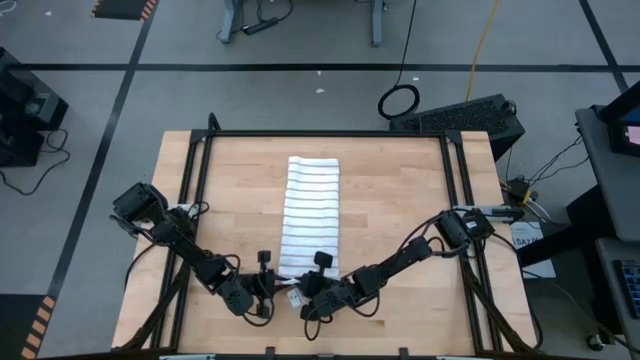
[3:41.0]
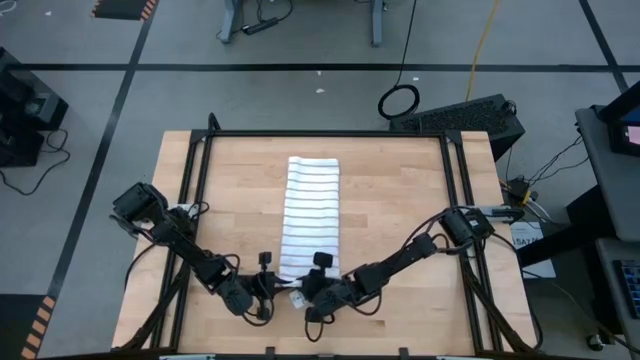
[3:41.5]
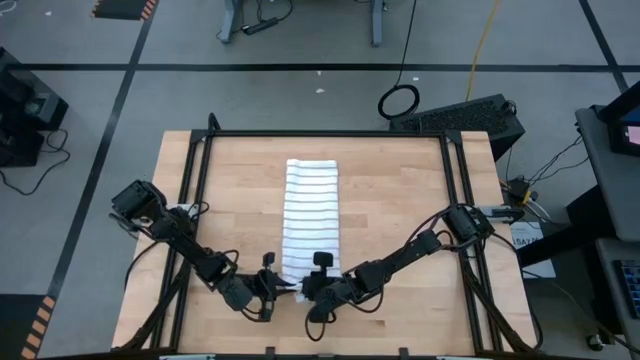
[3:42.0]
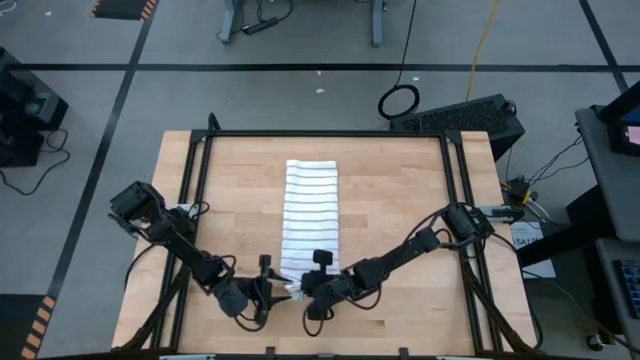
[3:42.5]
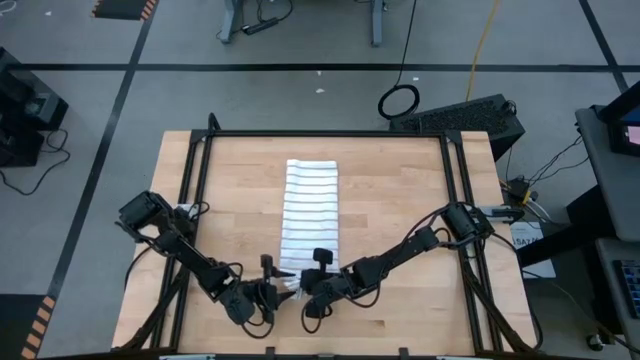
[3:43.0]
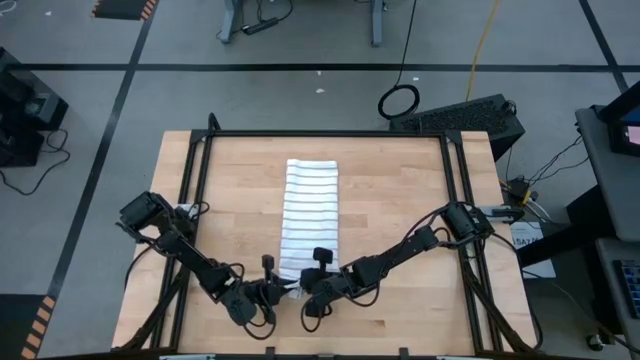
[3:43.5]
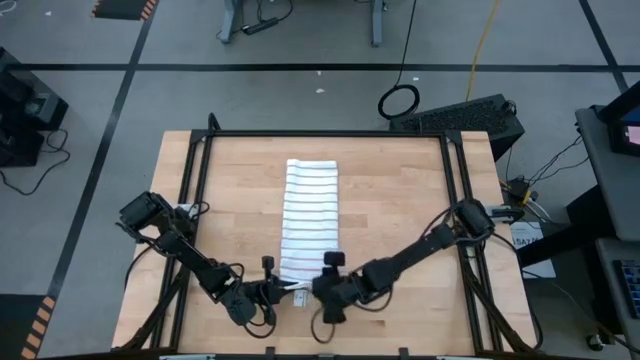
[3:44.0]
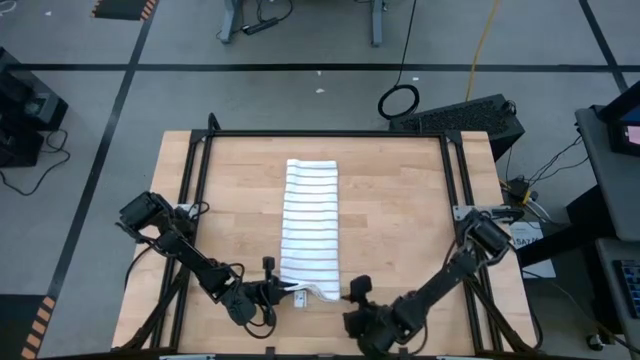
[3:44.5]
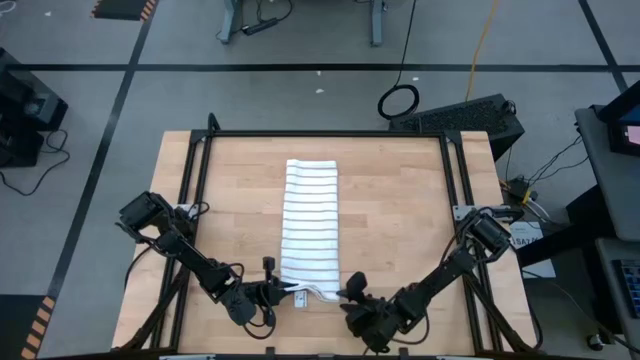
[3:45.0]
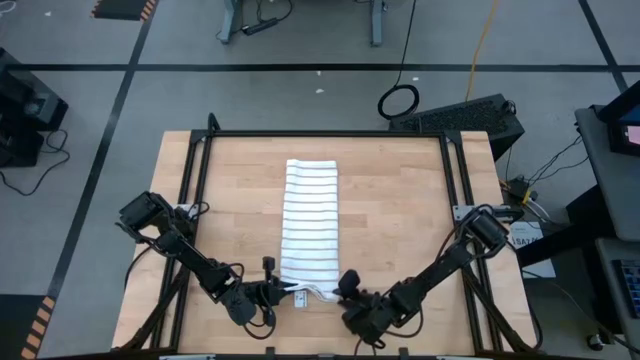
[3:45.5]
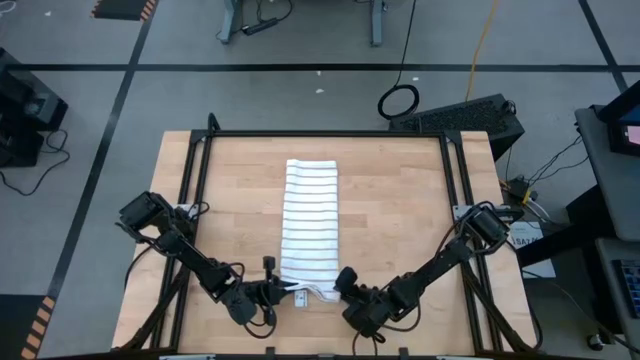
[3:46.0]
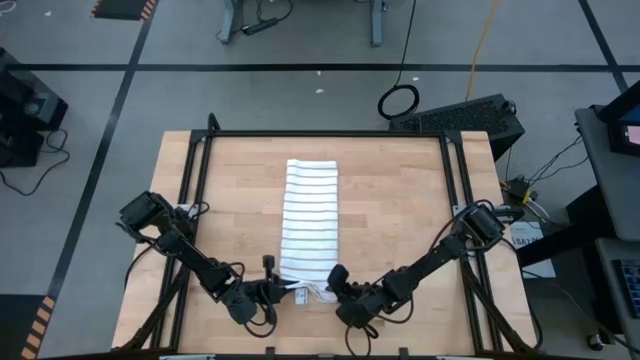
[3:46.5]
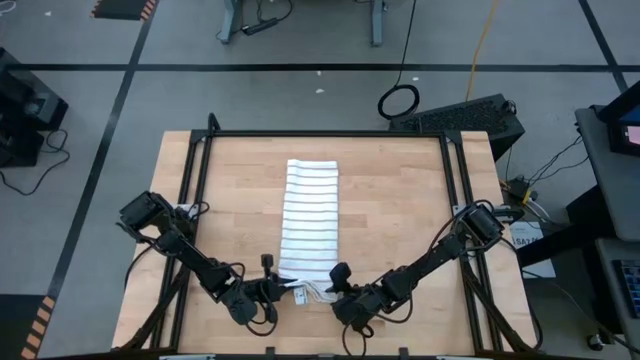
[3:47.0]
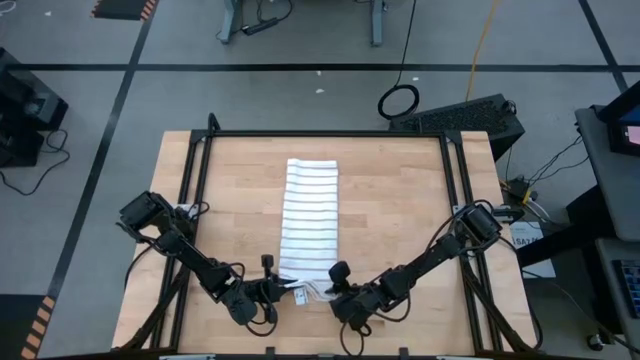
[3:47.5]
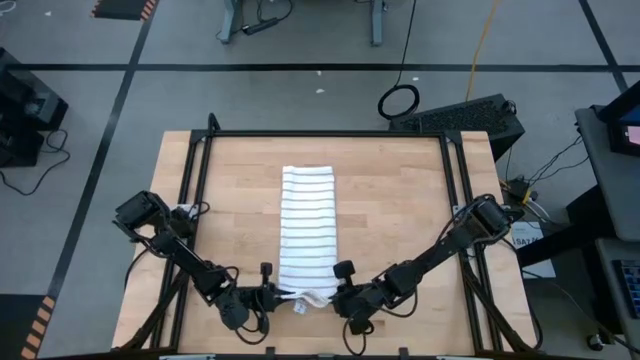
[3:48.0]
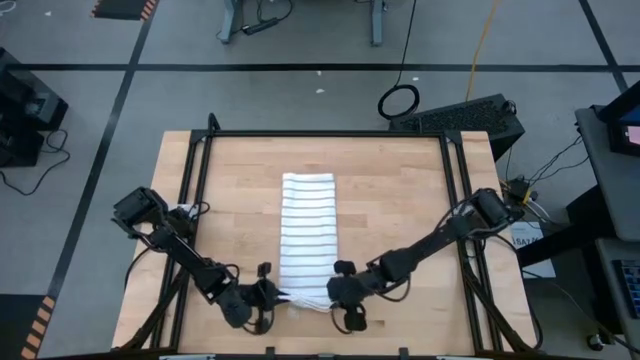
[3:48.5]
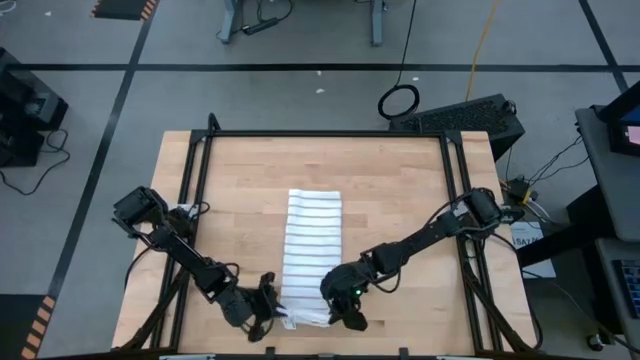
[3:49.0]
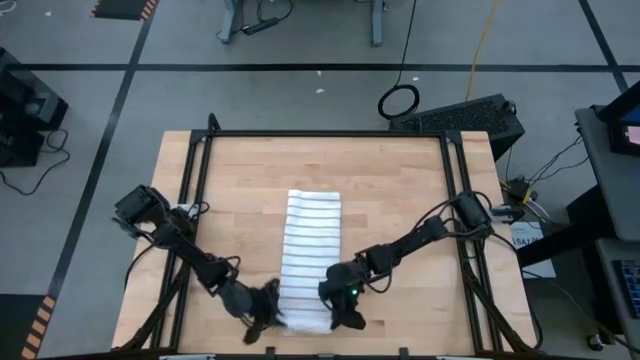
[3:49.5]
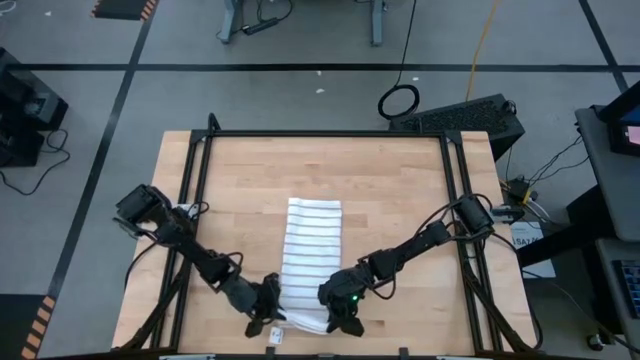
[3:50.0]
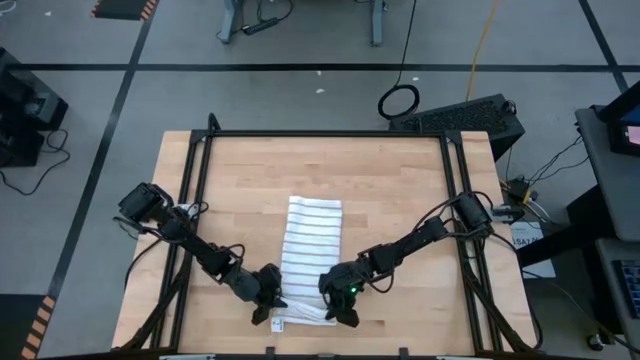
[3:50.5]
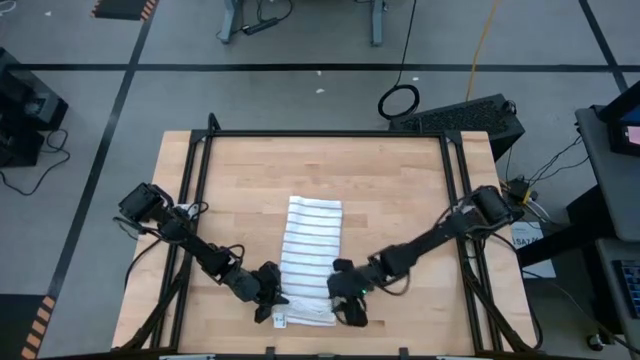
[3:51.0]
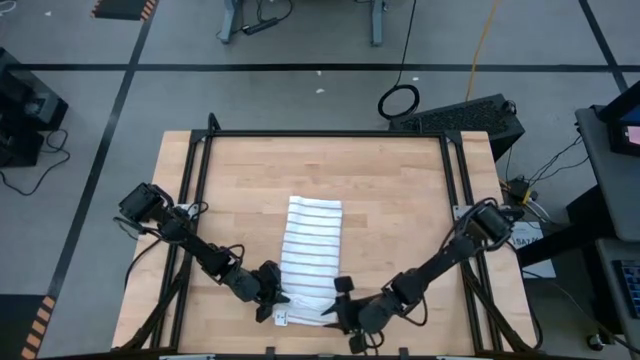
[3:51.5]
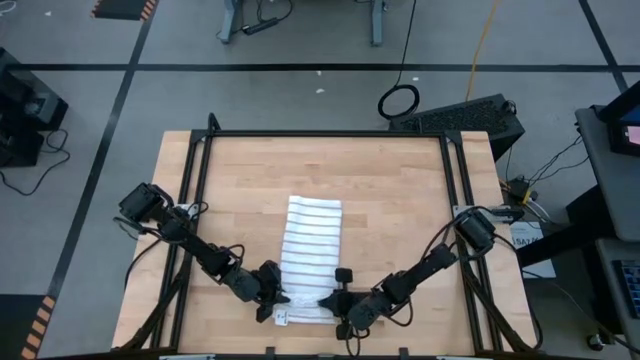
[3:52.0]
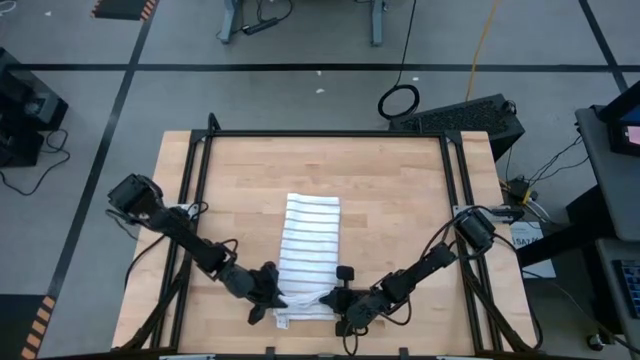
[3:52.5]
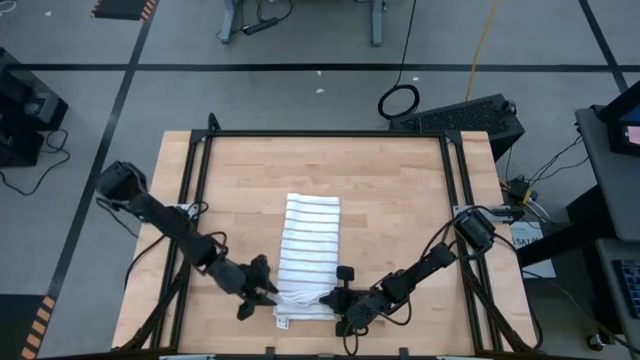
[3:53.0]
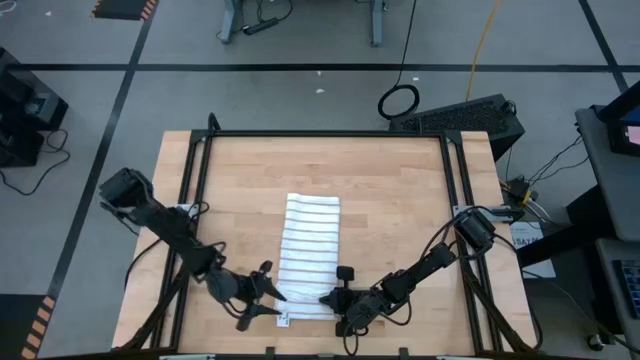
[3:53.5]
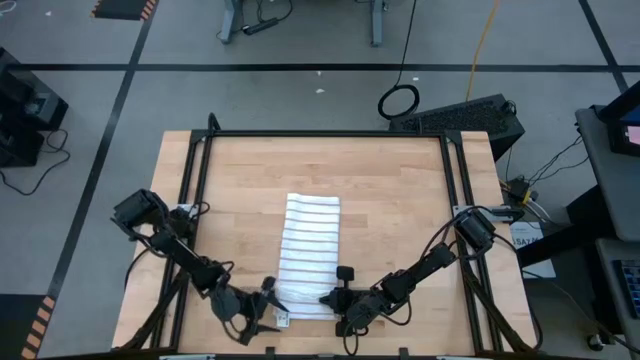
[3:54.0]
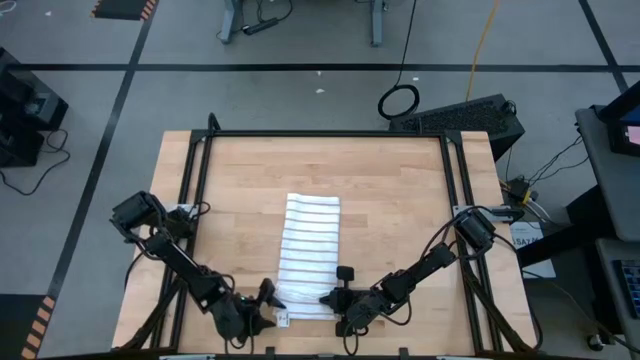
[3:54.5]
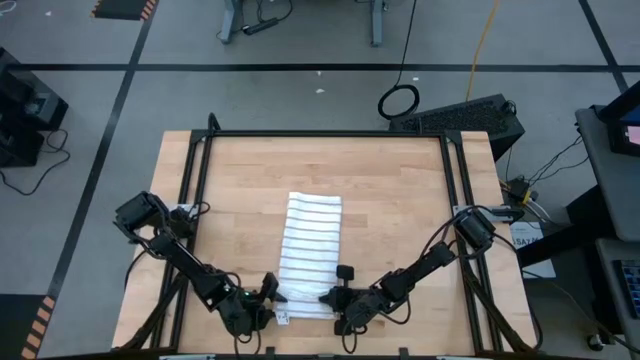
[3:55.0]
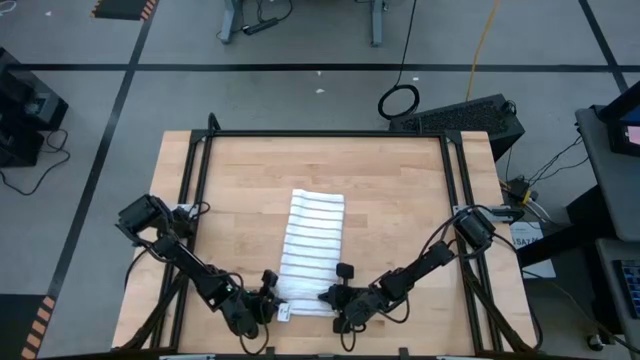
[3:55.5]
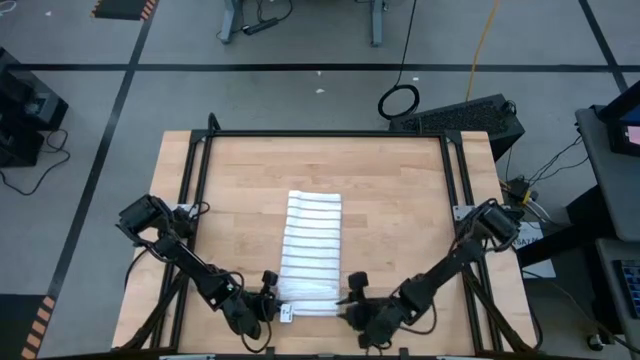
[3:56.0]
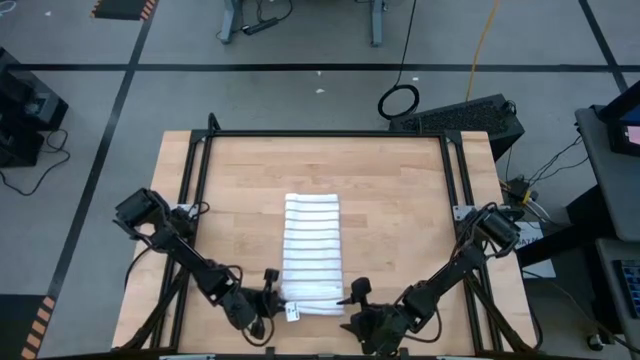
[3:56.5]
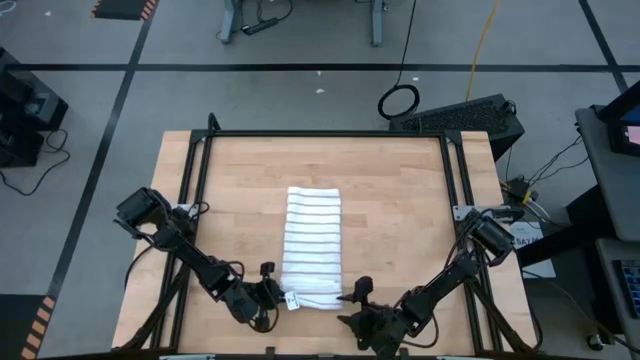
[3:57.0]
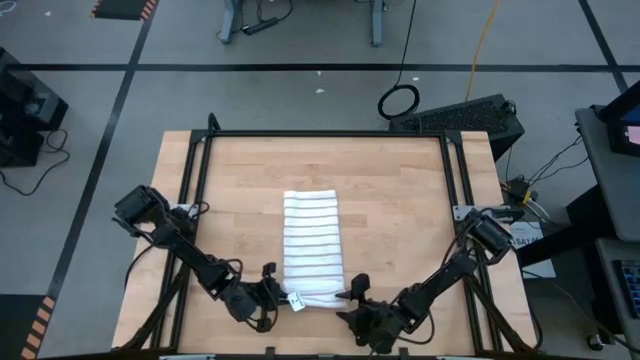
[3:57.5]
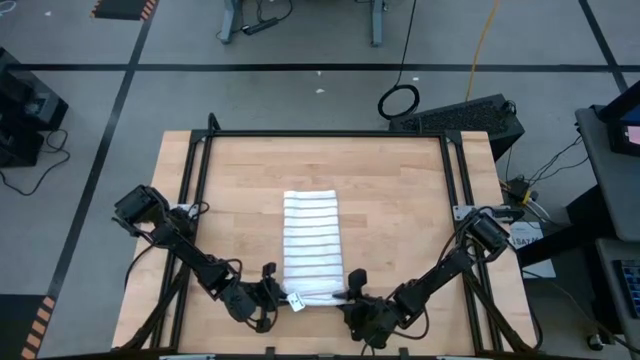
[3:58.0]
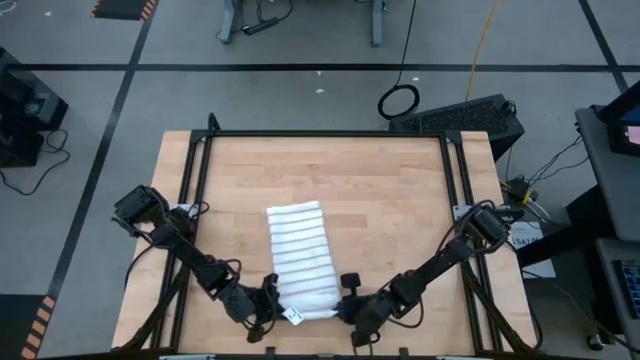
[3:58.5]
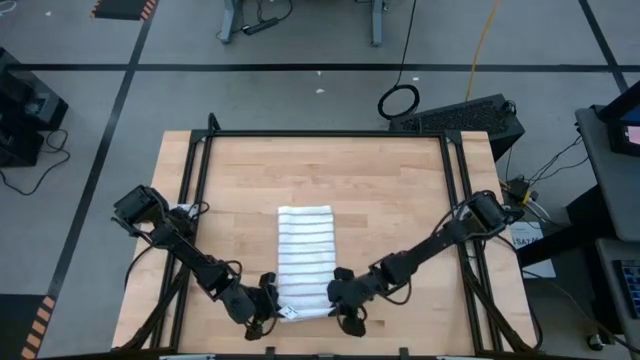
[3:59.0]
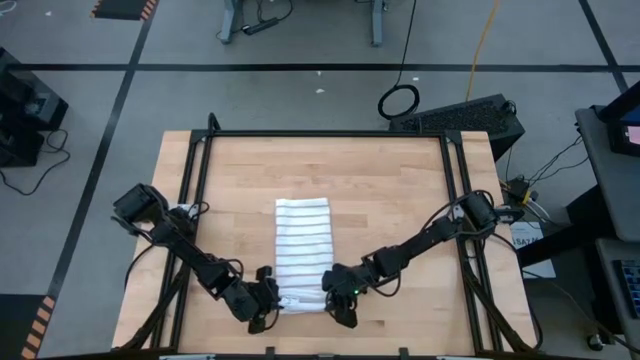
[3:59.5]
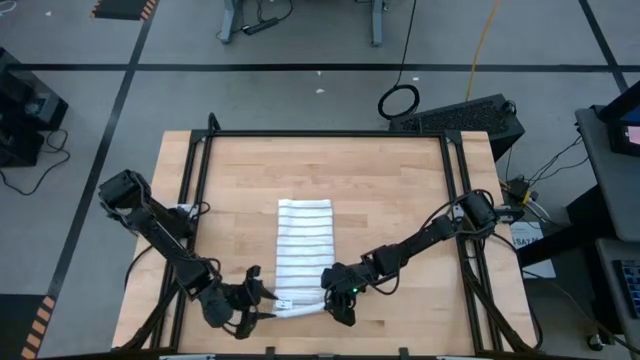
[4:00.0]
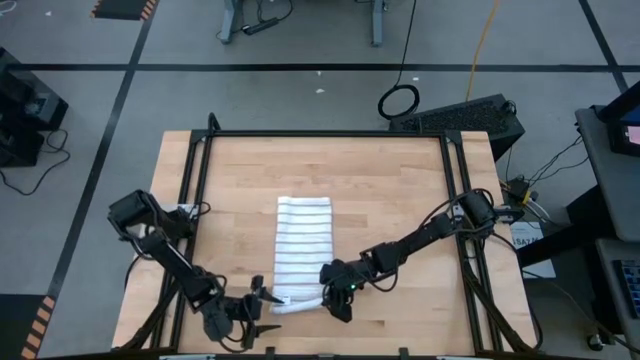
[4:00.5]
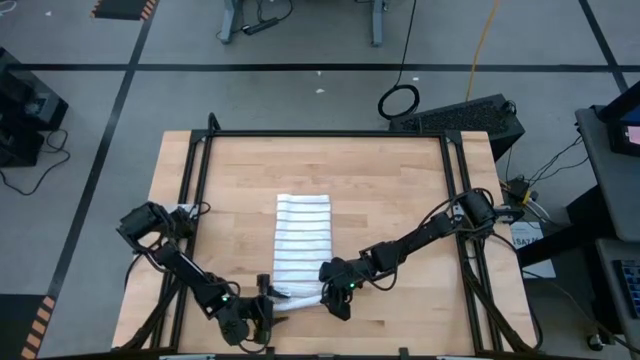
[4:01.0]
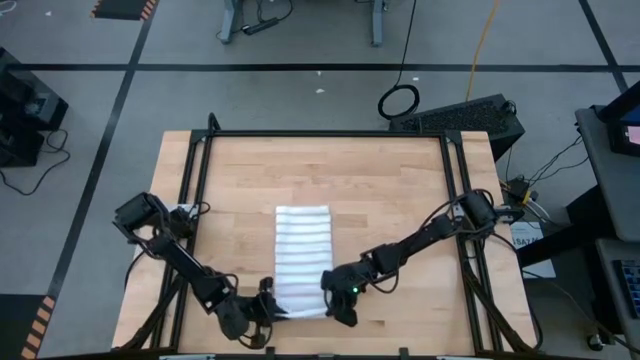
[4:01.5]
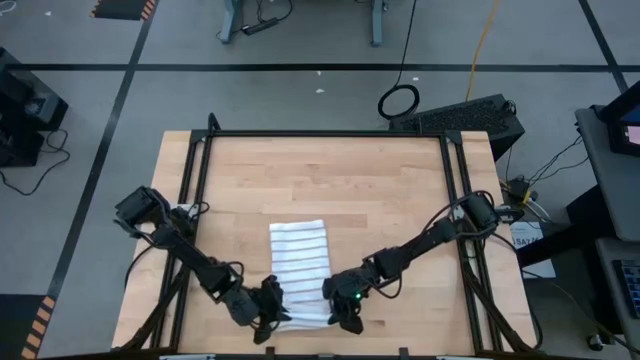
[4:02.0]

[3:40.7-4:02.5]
Task: Roll towel
Roll the white towel
